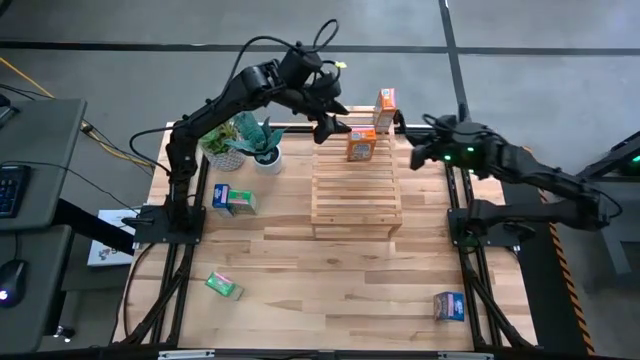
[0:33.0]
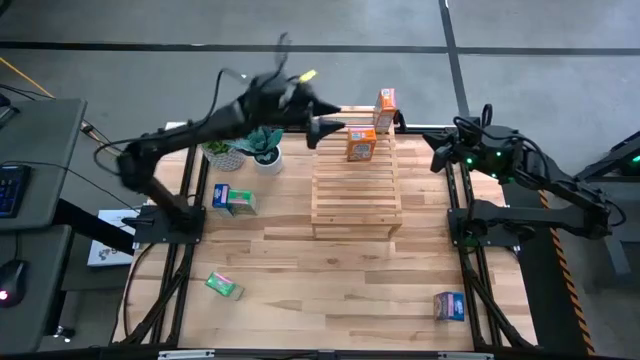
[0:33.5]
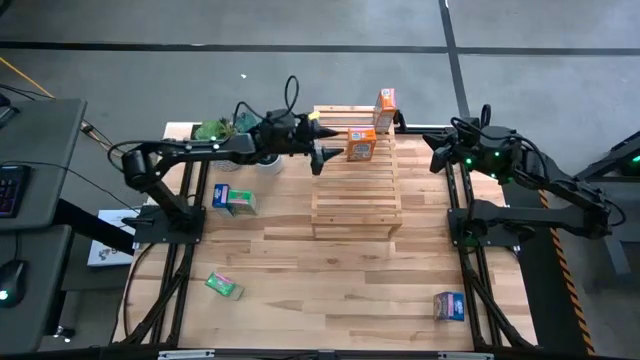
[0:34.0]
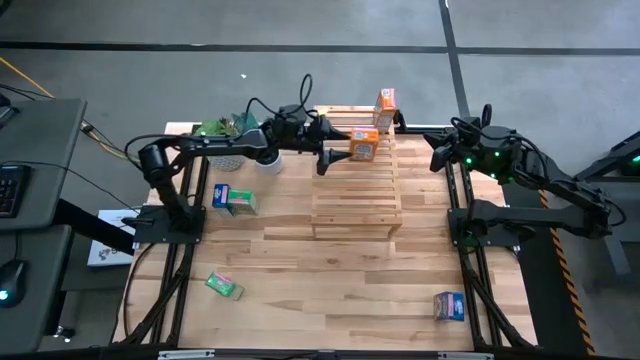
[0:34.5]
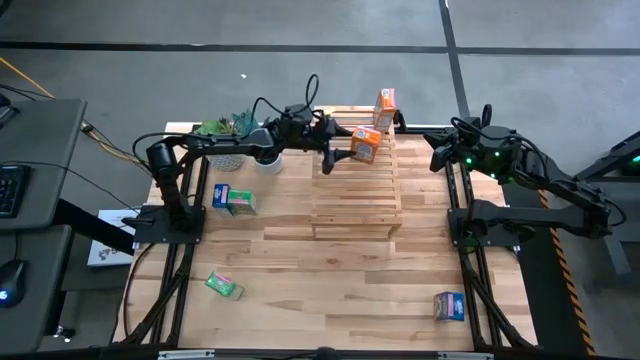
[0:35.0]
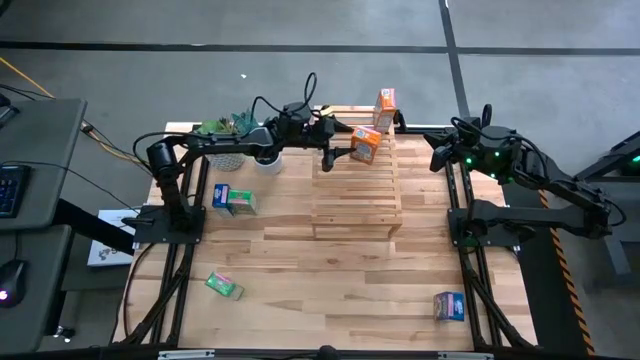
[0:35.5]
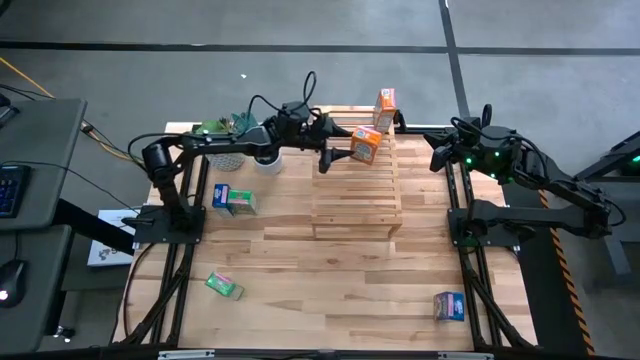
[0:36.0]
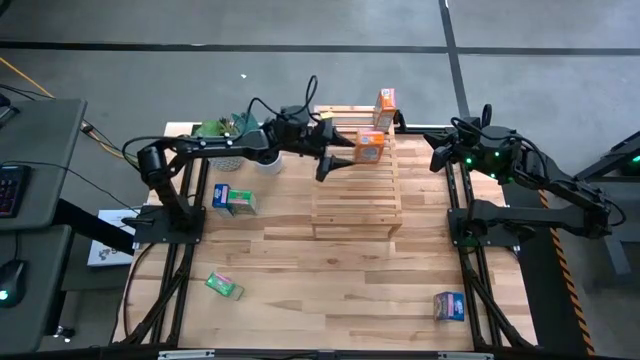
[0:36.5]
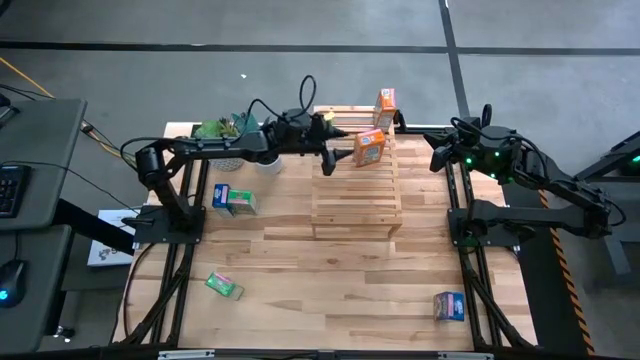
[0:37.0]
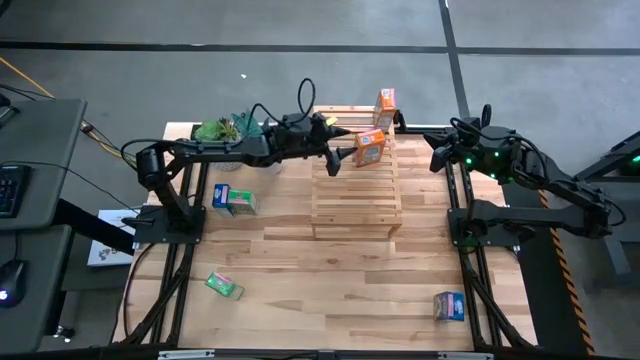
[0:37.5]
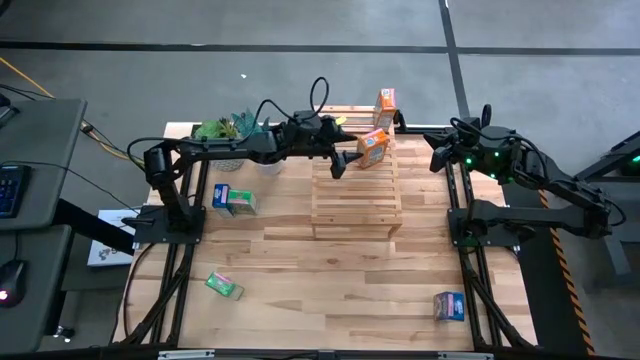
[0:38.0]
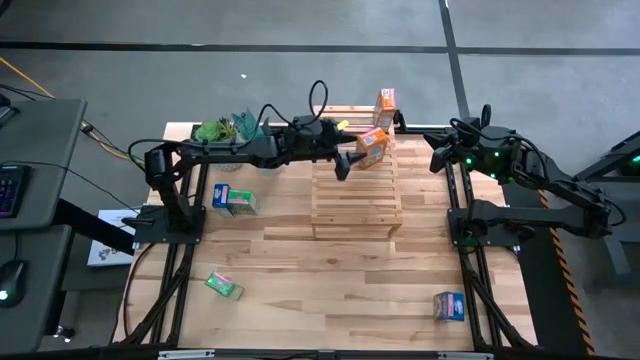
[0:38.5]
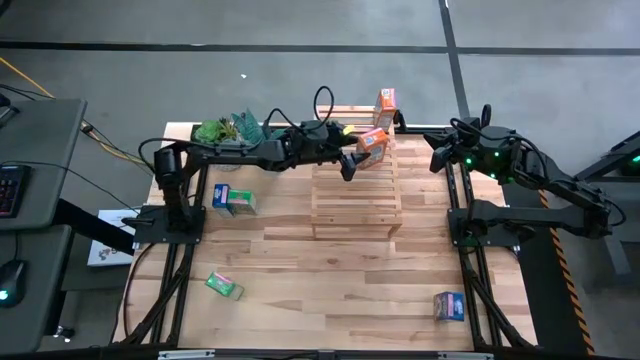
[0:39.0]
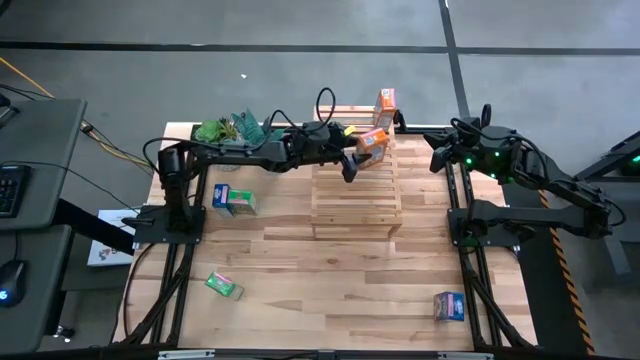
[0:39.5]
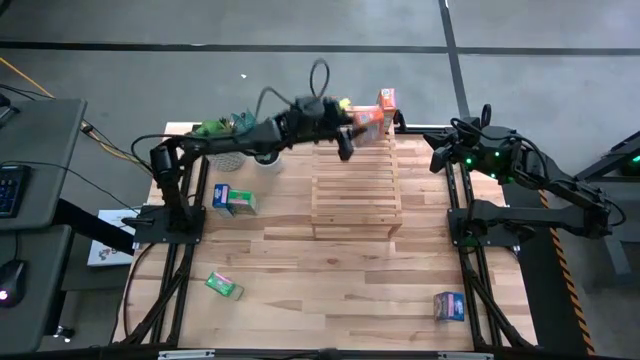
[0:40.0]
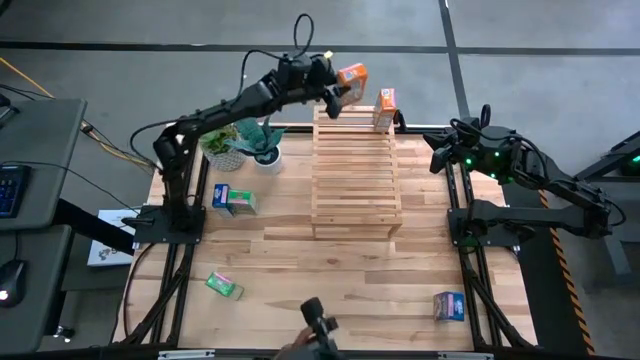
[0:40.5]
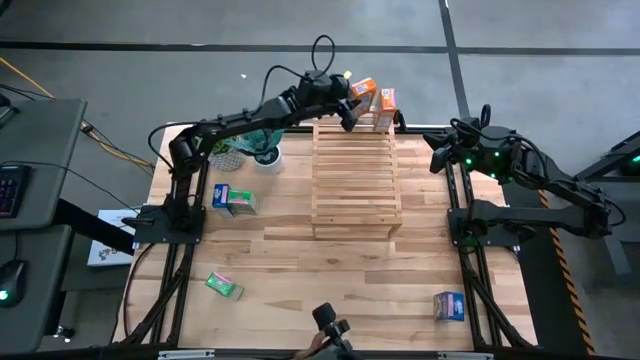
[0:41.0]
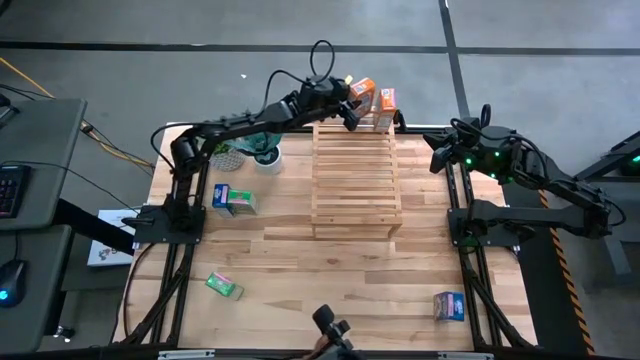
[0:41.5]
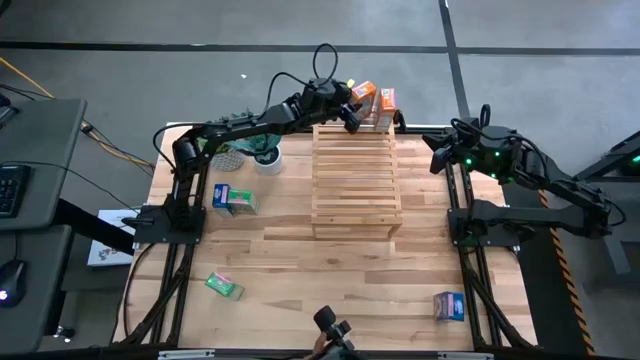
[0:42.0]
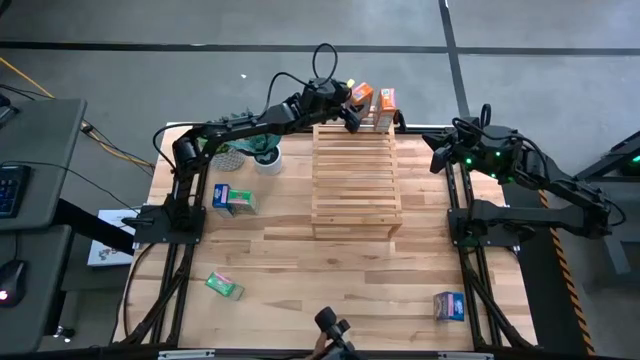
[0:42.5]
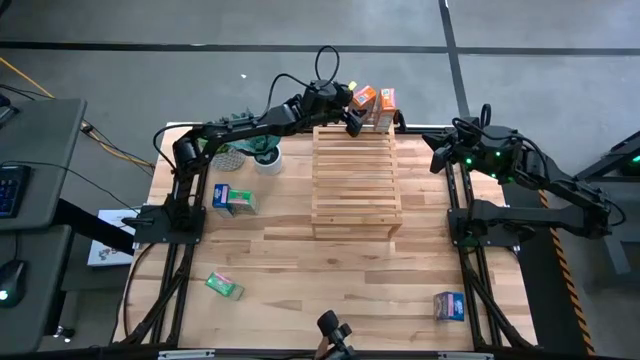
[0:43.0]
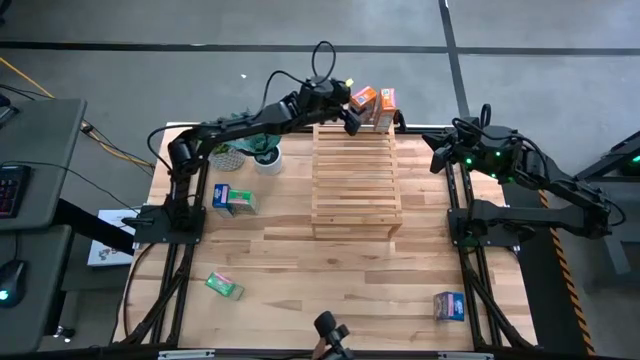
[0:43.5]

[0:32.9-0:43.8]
Task: Stack cereal on shelf
Put the bottom right blue cereal box on the shelf

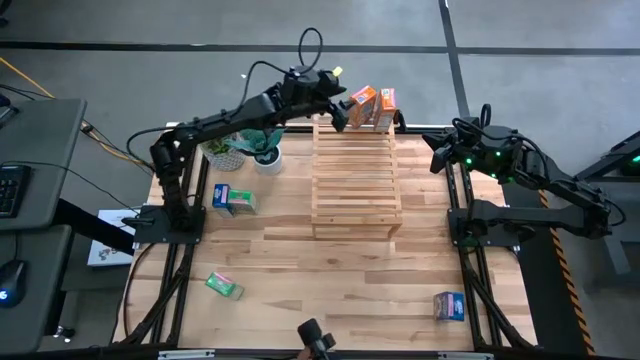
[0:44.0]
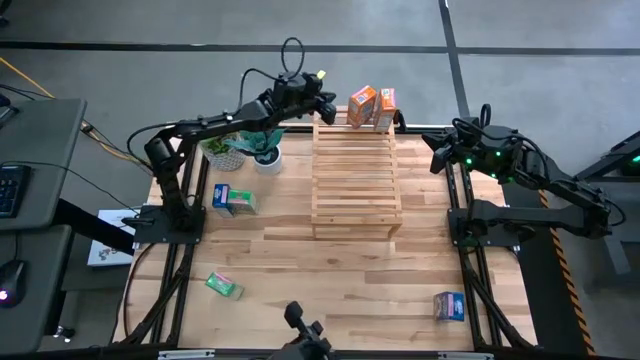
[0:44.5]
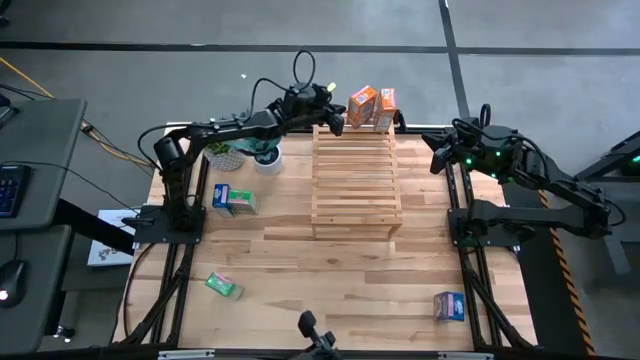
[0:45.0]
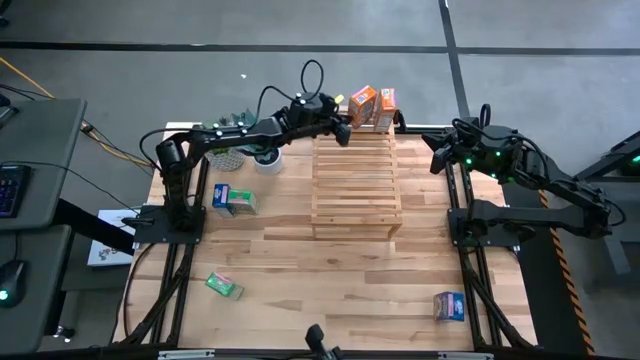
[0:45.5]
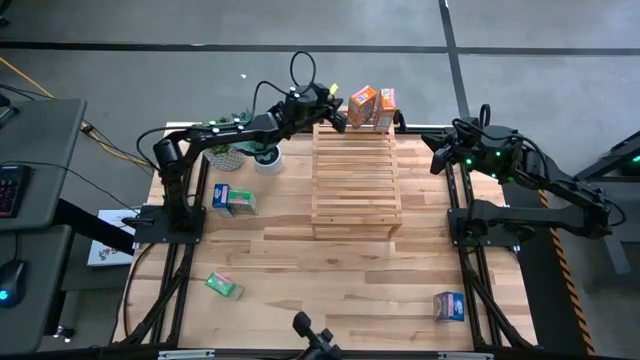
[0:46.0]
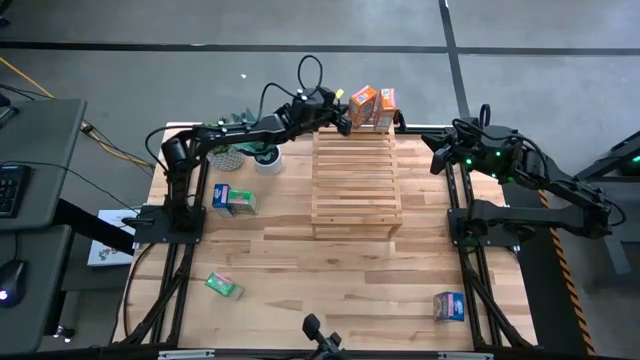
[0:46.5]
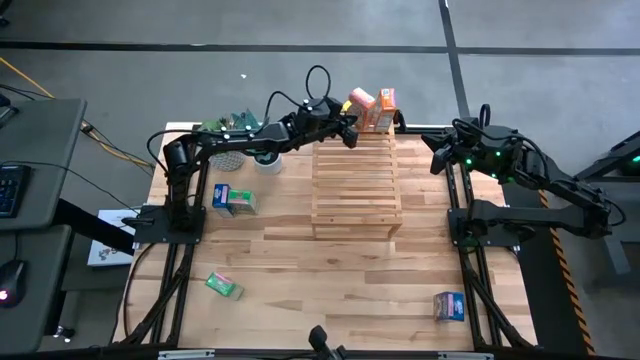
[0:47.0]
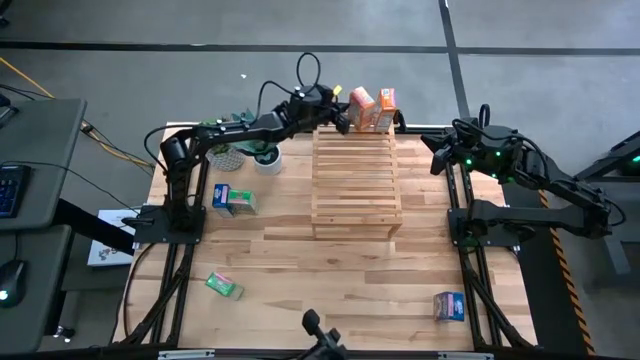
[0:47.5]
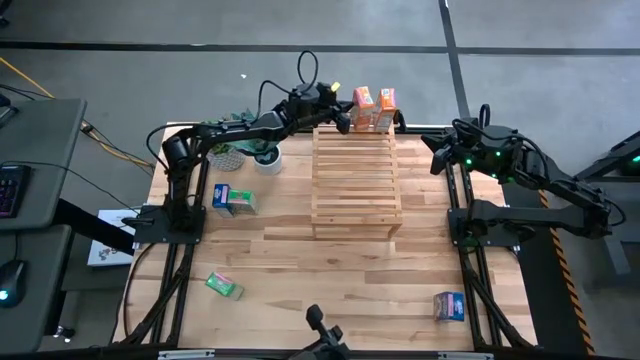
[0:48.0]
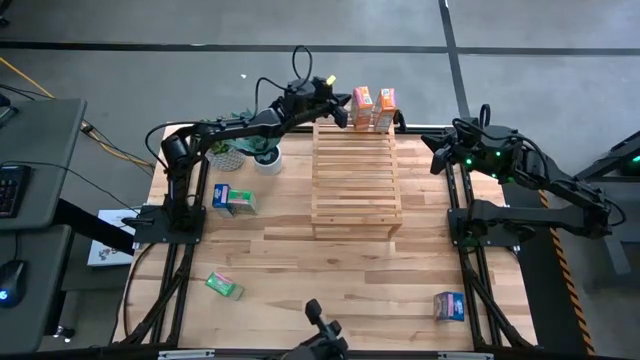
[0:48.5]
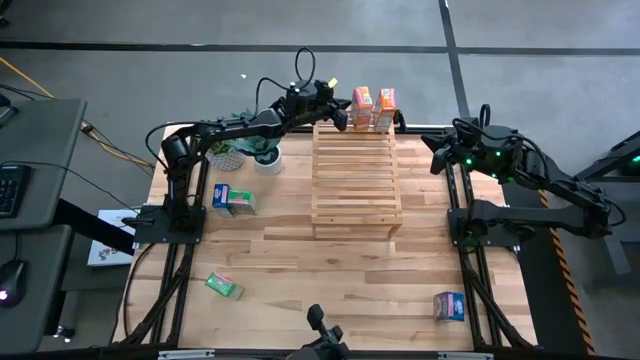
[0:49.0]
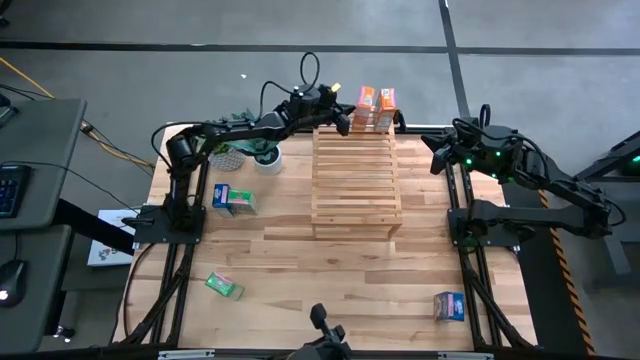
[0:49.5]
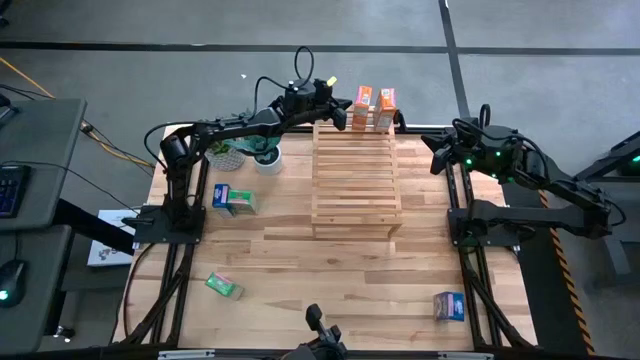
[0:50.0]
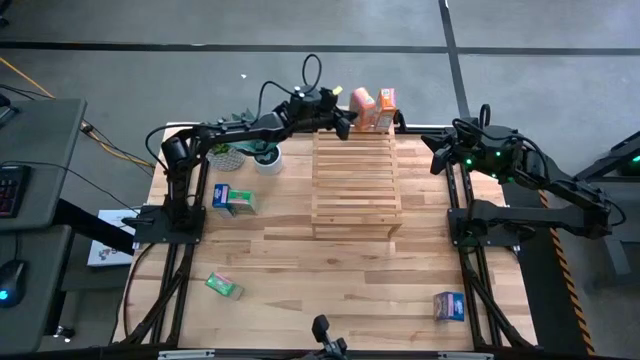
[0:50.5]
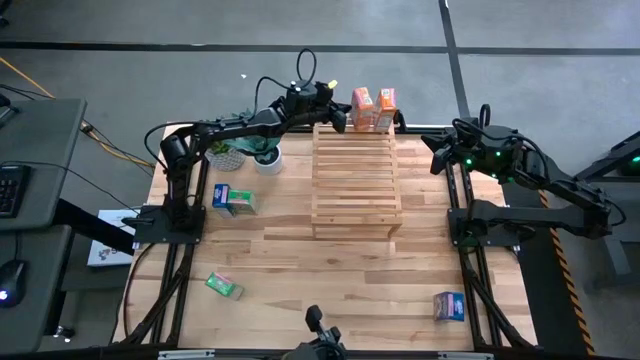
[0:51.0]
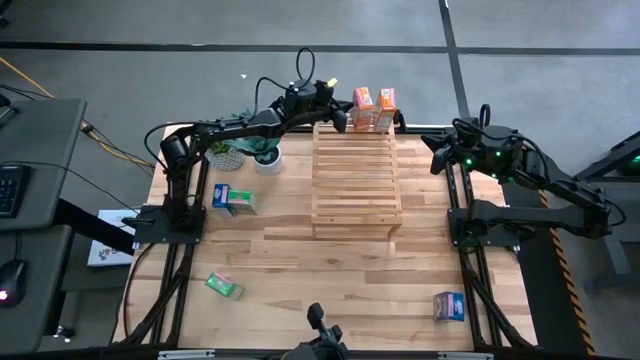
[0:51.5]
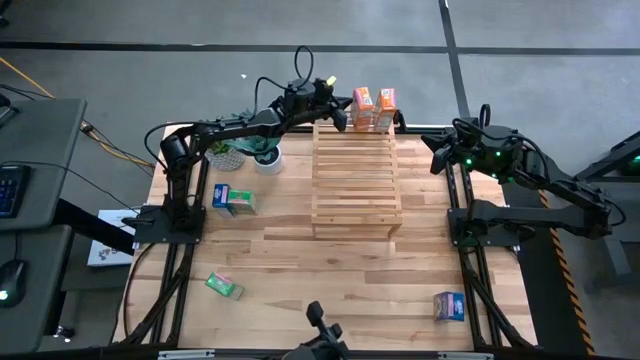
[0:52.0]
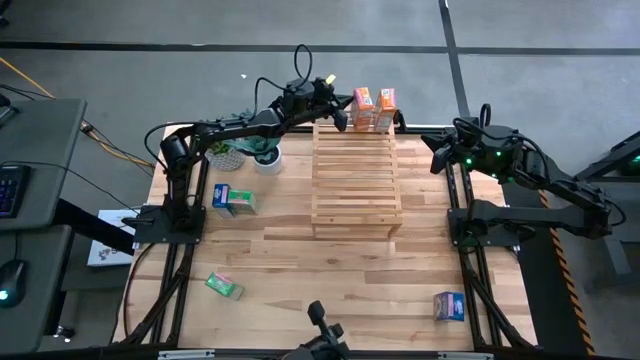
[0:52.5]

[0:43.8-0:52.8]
Move the orange cereal box beside the other orange cereal box on the shelf
